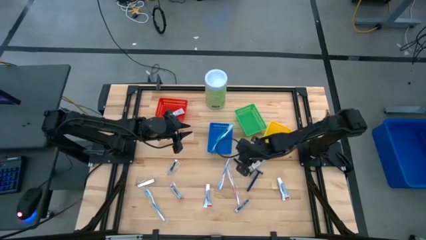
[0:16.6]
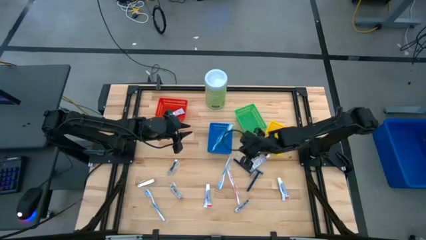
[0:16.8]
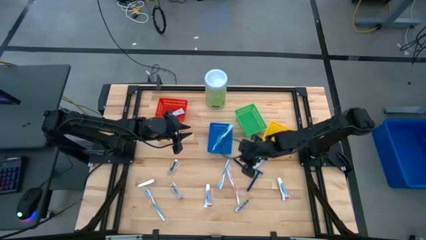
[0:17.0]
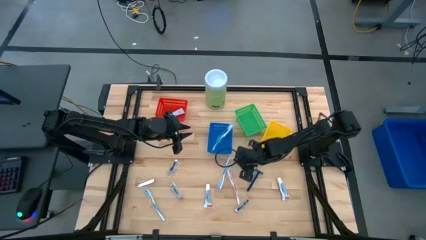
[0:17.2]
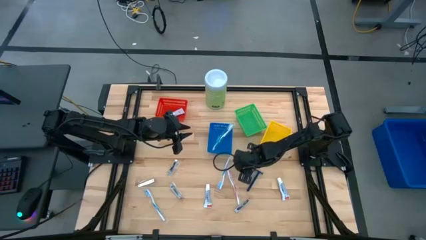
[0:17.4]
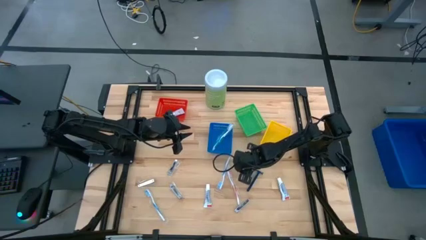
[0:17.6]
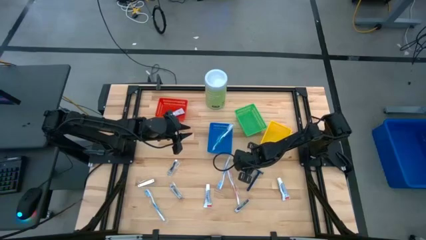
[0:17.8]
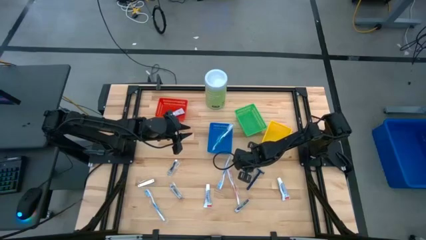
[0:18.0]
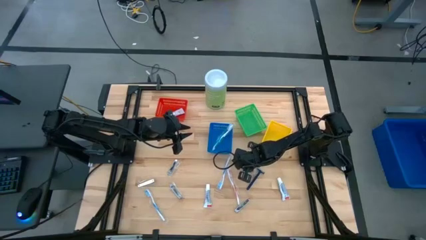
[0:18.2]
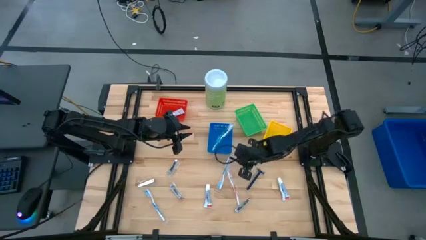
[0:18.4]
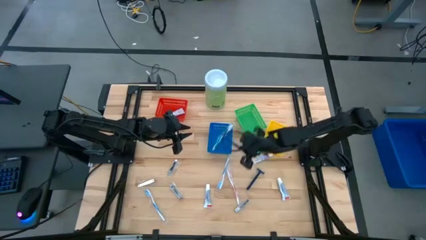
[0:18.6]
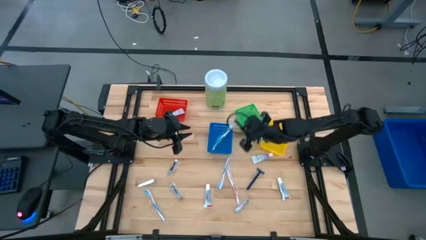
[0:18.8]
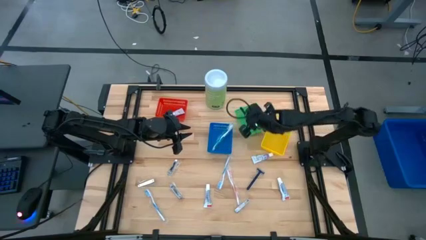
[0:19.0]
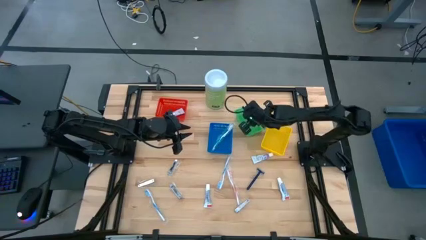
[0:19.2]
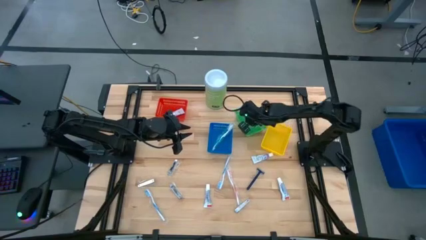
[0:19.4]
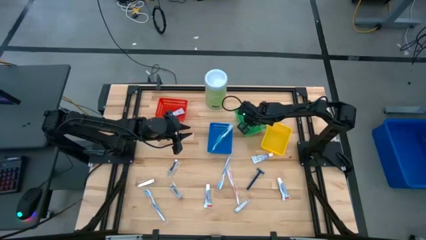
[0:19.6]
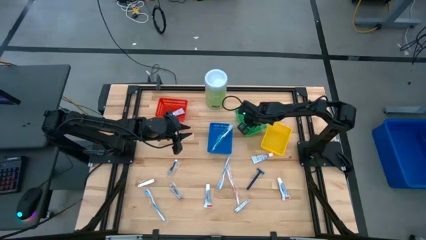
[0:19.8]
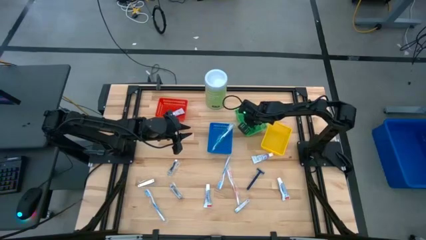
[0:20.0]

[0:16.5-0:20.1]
Task: Pick & Place Travel size toiletries
Put the blue razor into the green bin

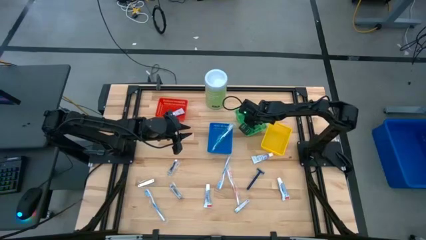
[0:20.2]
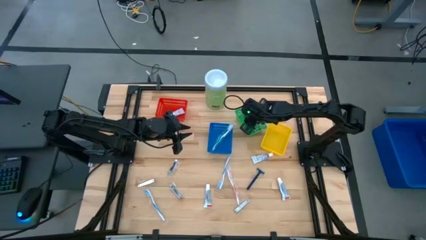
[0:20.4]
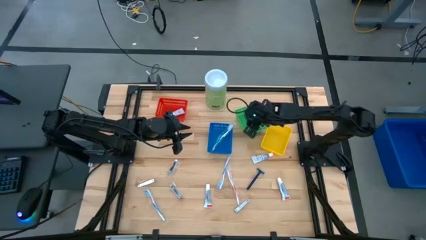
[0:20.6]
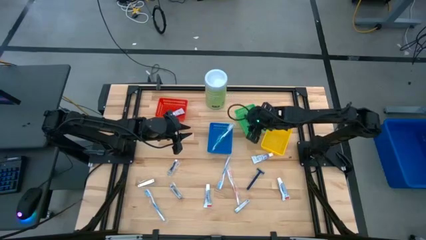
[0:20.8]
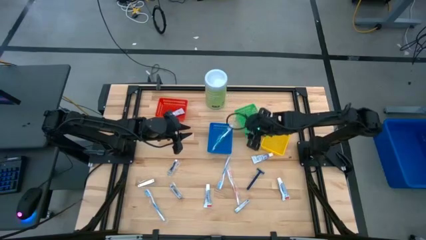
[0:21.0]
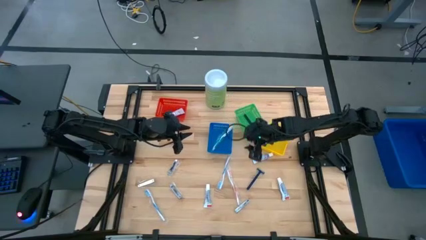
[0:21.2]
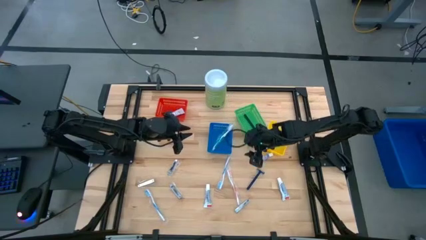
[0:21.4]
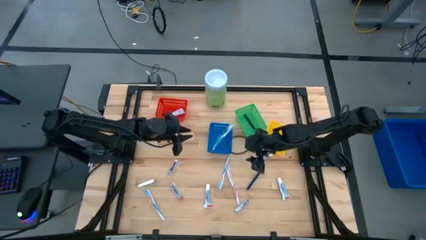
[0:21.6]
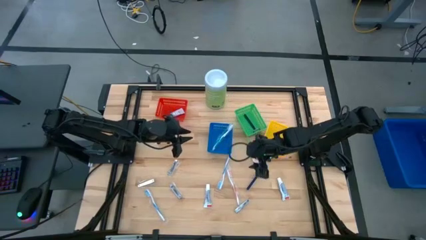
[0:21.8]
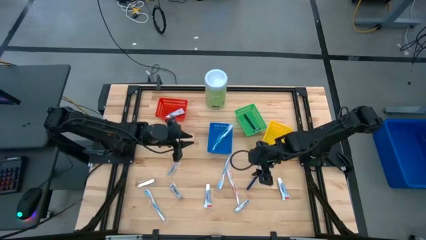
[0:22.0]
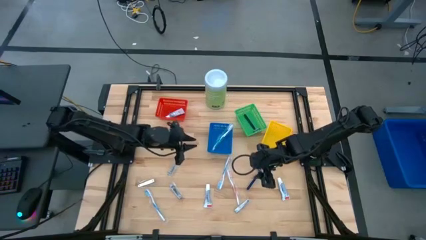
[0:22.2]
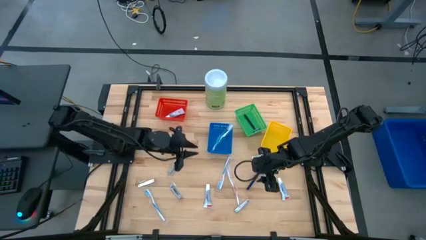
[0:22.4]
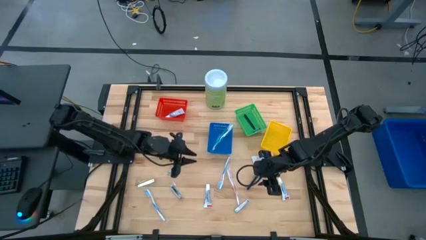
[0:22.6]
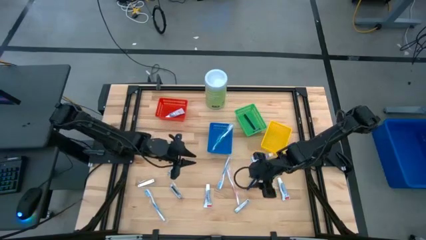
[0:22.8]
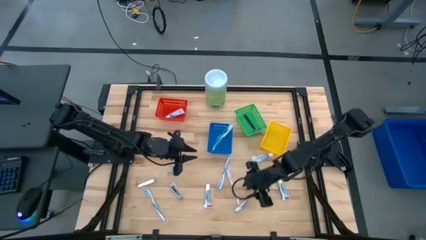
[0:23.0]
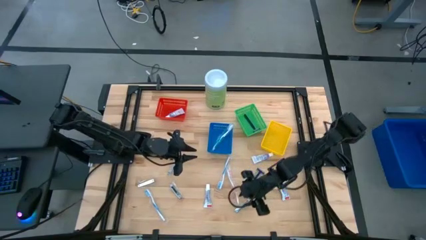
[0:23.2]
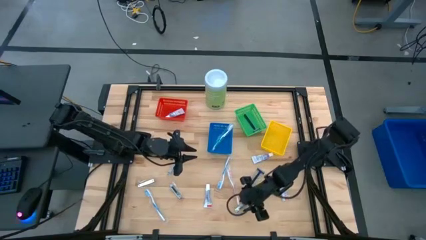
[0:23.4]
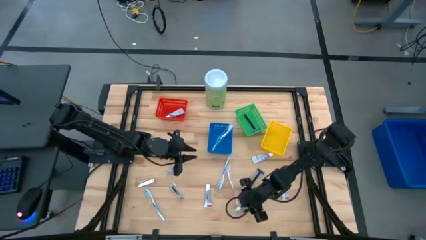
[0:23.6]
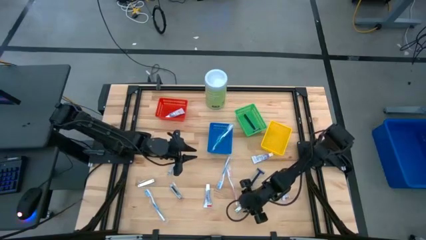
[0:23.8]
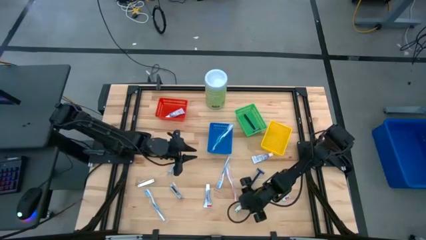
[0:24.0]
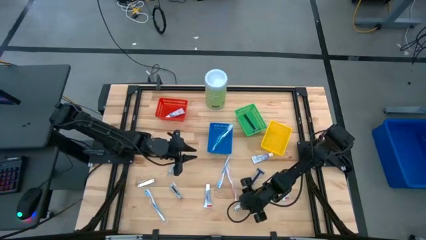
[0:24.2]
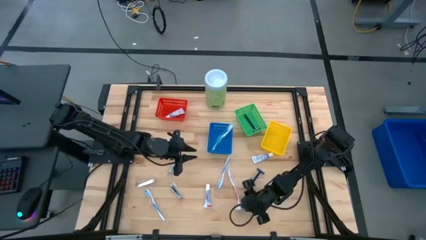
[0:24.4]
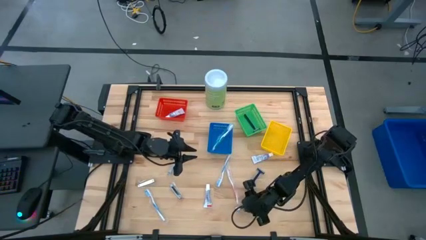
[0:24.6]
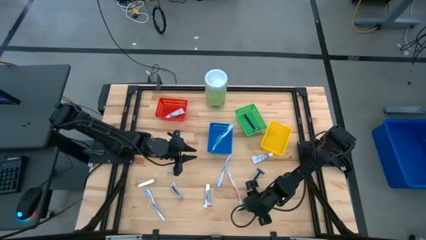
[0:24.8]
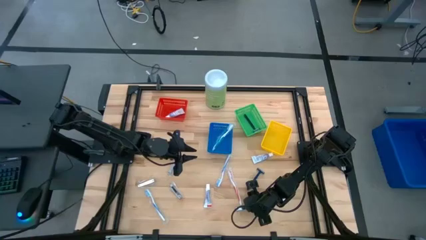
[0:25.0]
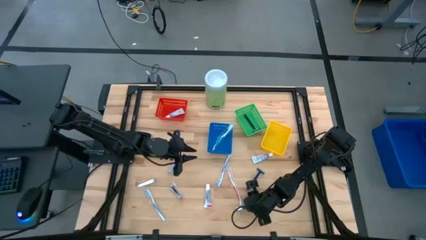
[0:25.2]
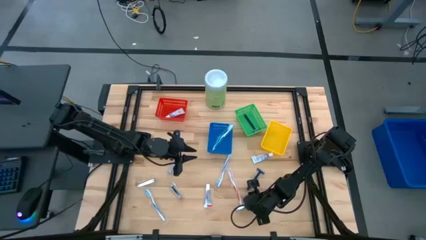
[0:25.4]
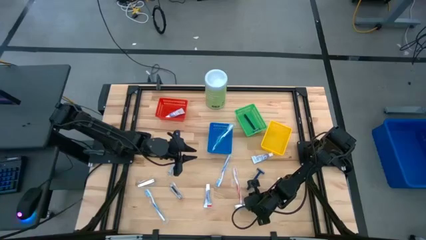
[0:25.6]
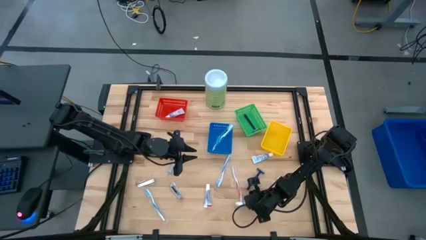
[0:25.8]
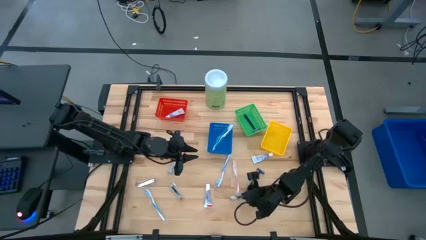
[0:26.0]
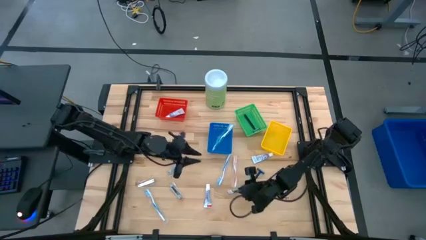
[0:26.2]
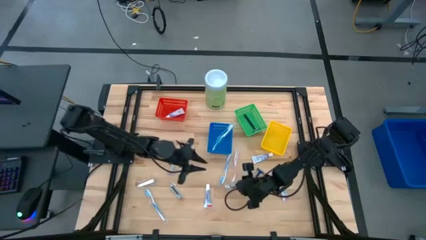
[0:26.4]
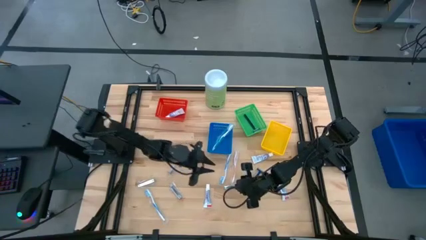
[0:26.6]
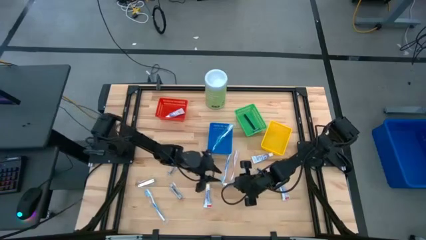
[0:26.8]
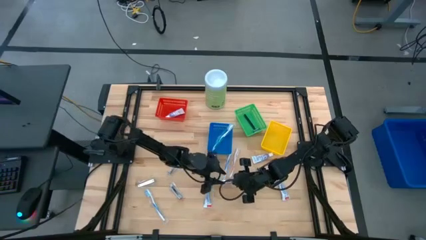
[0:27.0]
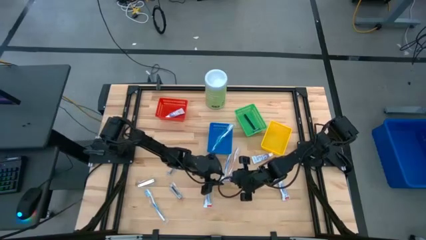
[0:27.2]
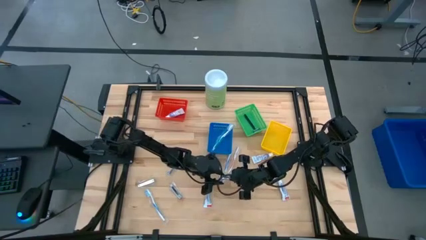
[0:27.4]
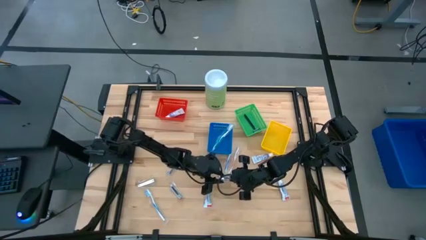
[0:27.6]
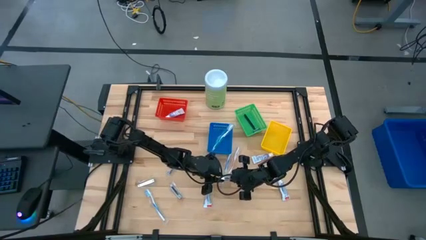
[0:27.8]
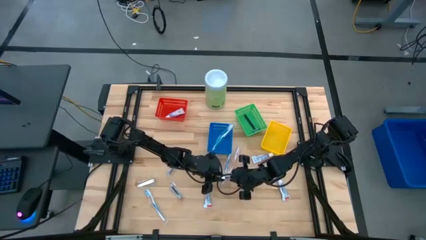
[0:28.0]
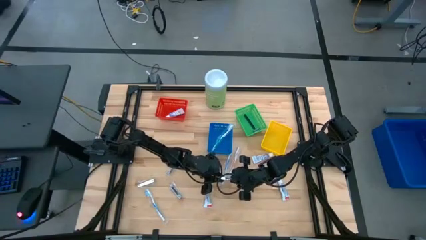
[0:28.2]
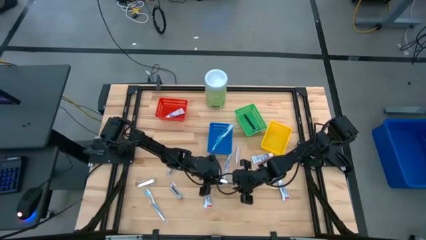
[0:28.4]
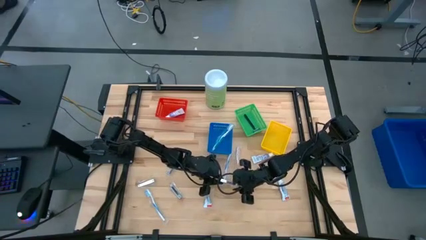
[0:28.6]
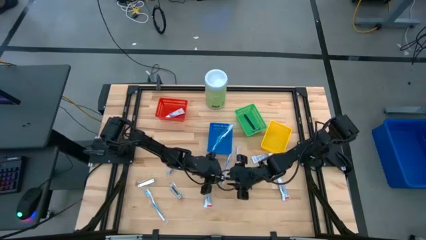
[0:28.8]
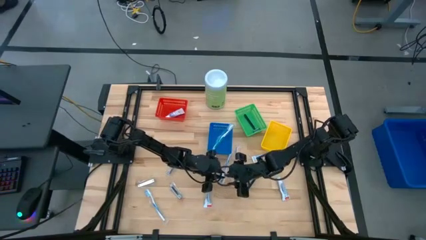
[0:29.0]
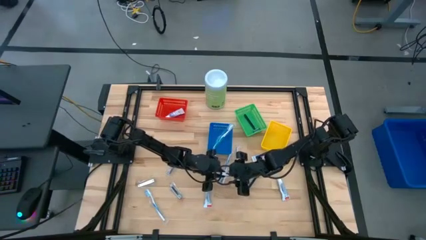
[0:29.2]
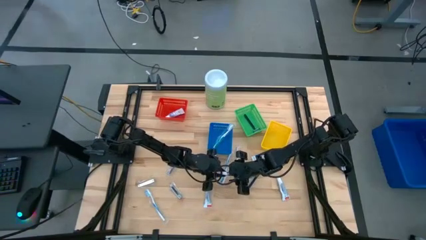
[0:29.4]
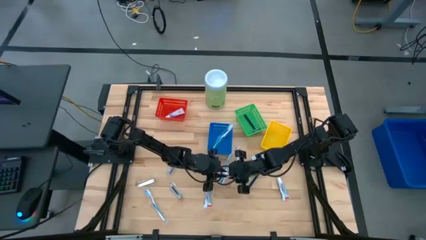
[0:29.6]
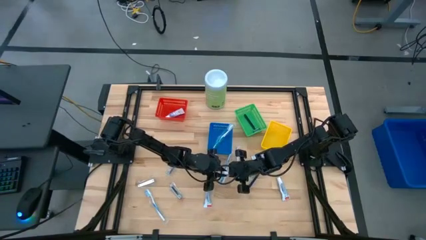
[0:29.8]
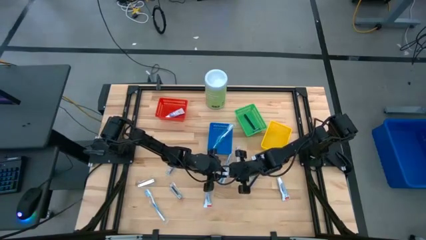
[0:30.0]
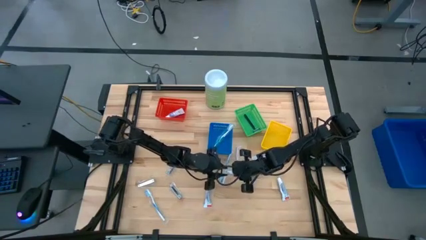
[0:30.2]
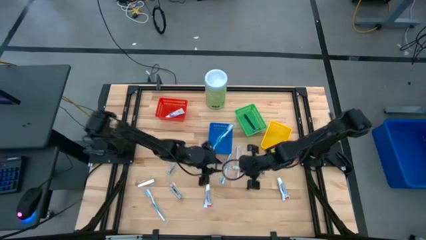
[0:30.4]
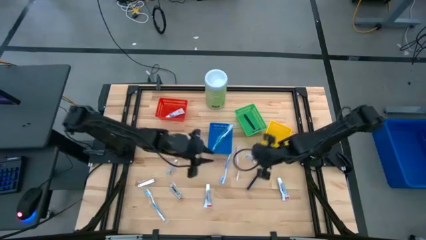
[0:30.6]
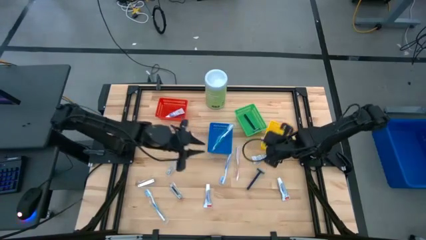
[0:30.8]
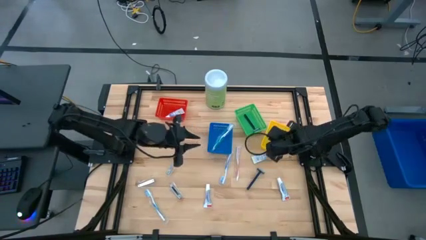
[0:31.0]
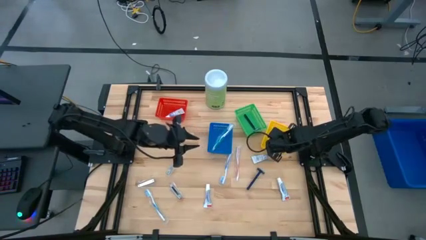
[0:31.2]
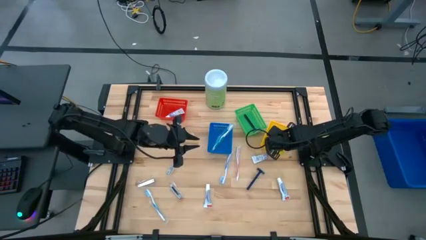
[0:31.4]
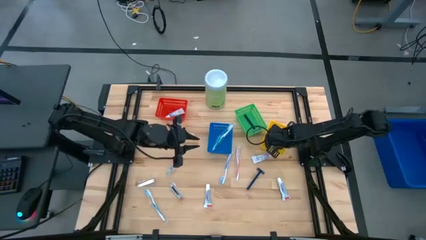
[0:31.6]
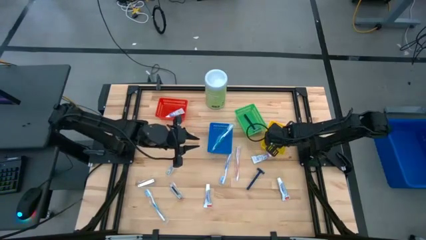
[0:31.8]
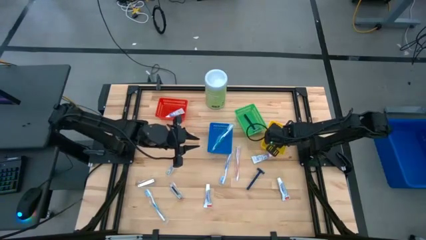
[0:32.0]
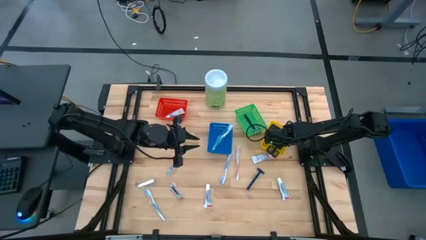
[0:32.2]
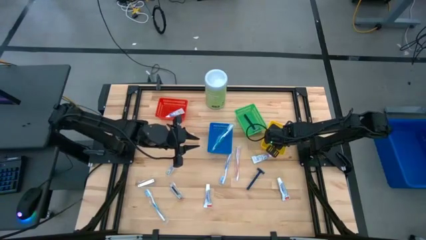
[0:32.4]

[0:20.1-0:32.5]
Put the silver nail cutter into the yellow bin
